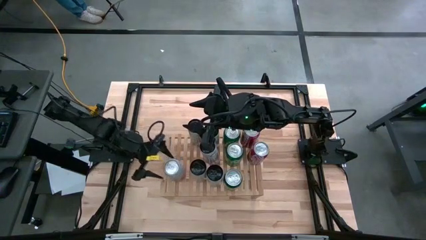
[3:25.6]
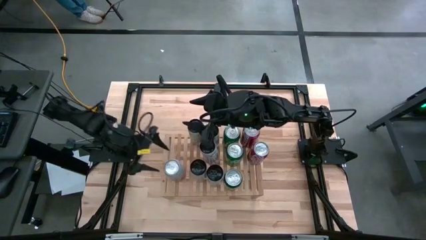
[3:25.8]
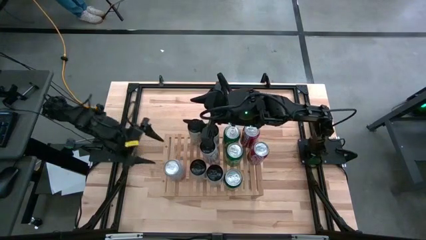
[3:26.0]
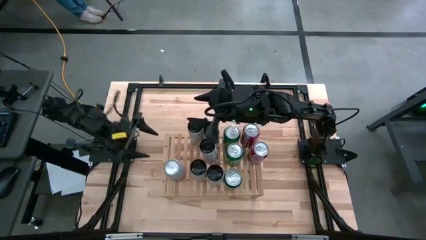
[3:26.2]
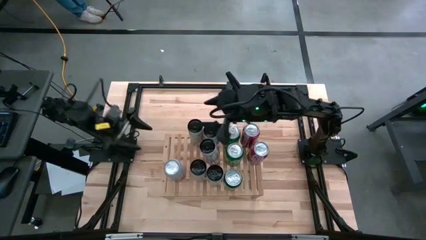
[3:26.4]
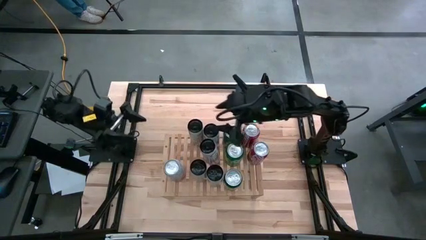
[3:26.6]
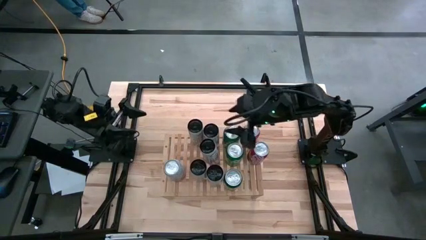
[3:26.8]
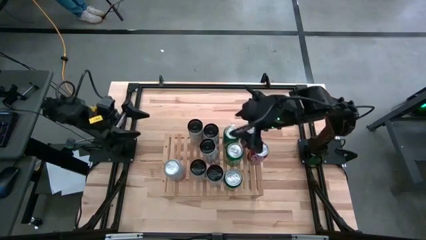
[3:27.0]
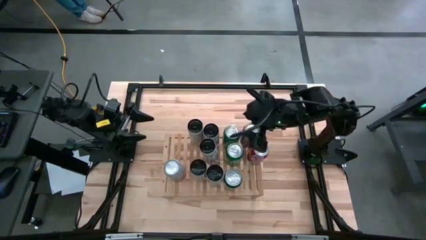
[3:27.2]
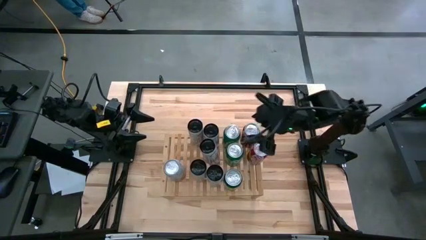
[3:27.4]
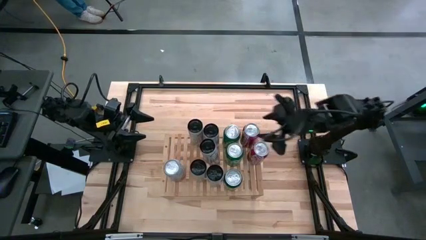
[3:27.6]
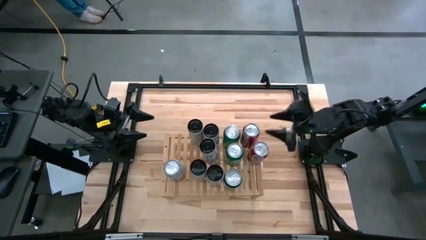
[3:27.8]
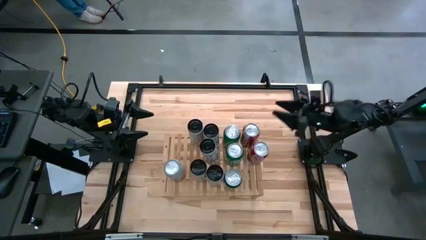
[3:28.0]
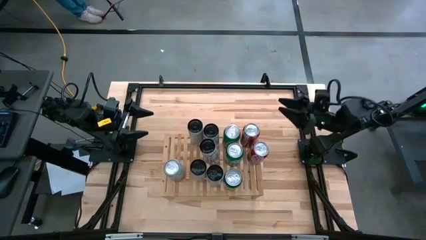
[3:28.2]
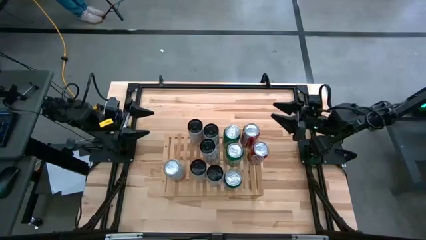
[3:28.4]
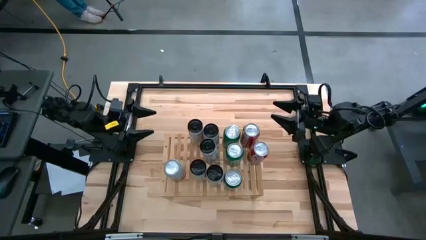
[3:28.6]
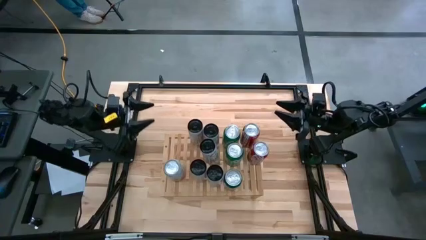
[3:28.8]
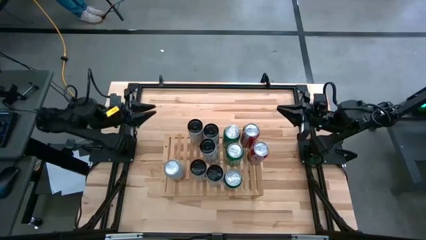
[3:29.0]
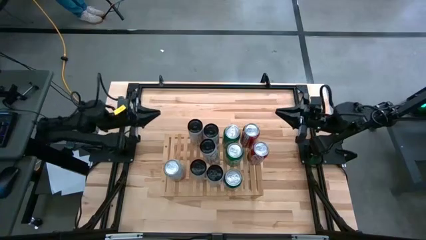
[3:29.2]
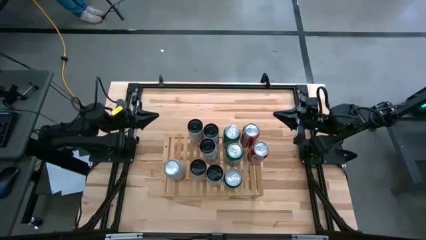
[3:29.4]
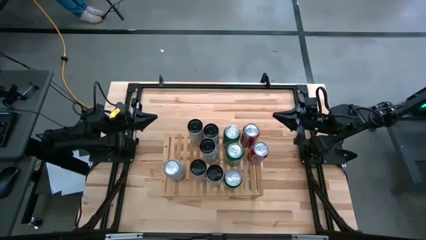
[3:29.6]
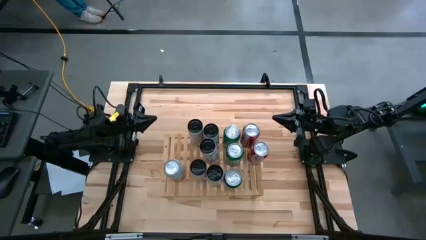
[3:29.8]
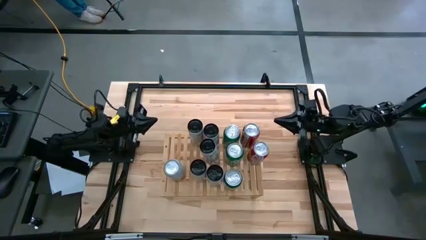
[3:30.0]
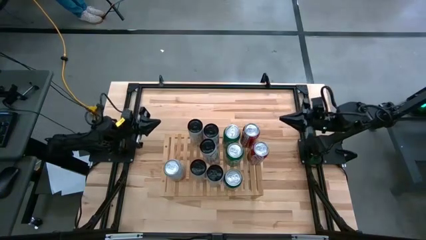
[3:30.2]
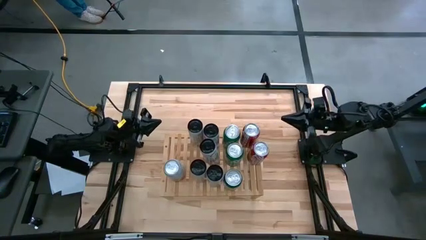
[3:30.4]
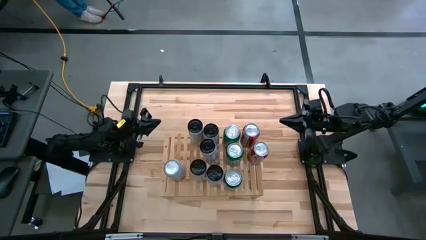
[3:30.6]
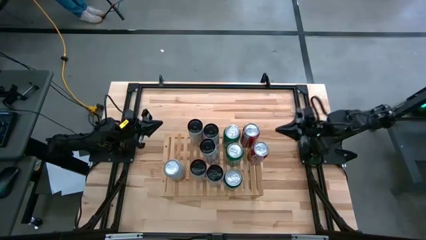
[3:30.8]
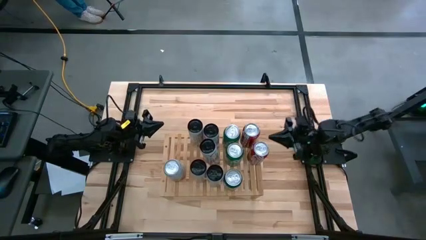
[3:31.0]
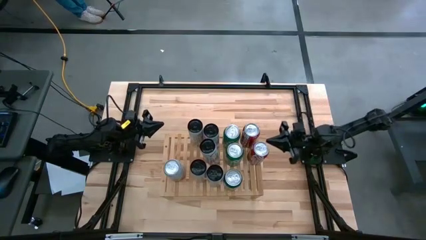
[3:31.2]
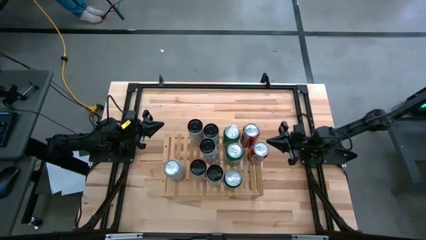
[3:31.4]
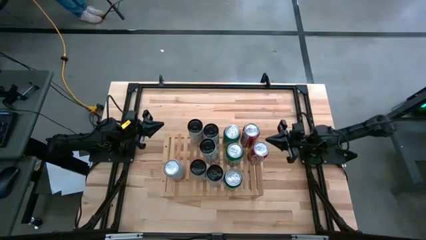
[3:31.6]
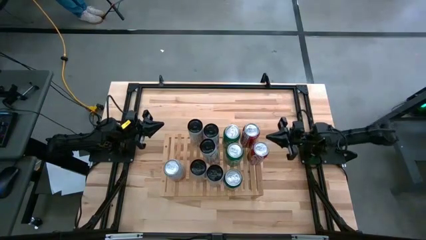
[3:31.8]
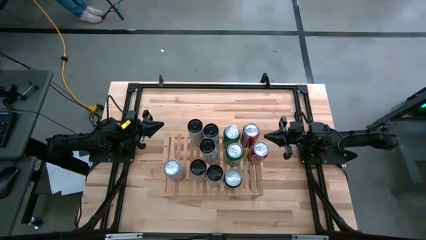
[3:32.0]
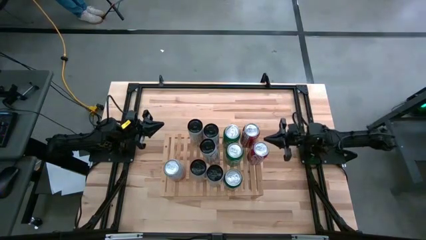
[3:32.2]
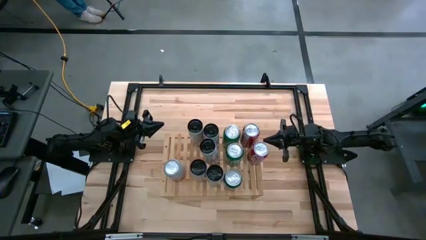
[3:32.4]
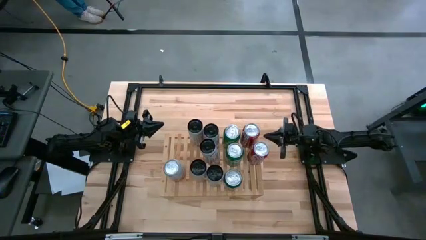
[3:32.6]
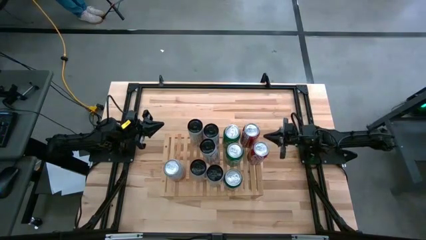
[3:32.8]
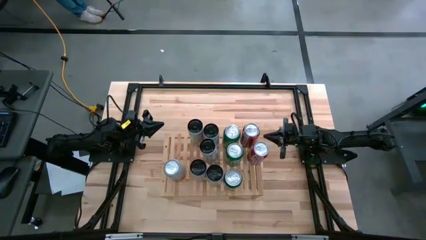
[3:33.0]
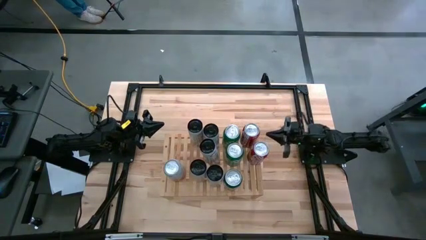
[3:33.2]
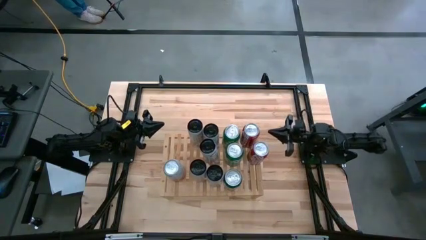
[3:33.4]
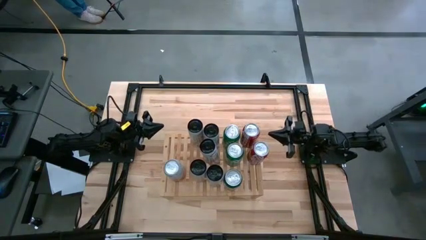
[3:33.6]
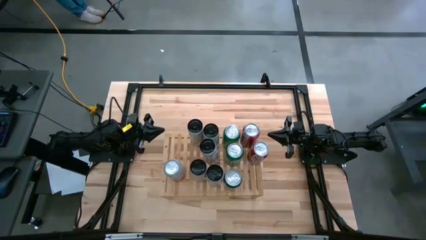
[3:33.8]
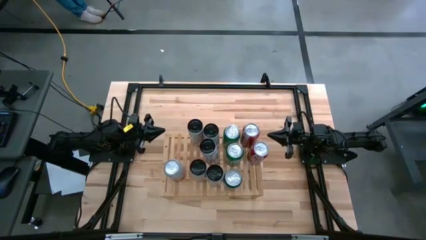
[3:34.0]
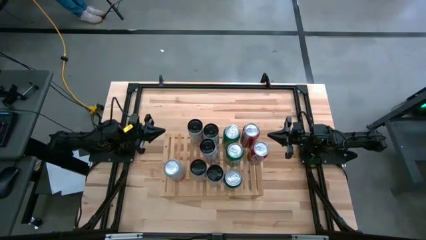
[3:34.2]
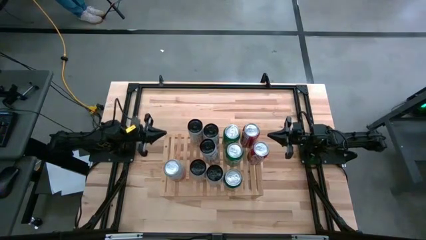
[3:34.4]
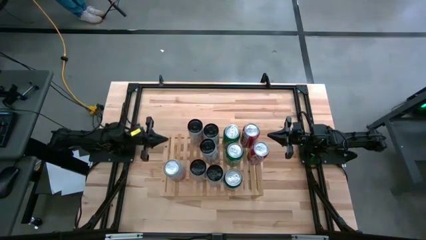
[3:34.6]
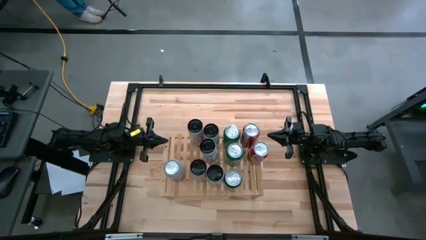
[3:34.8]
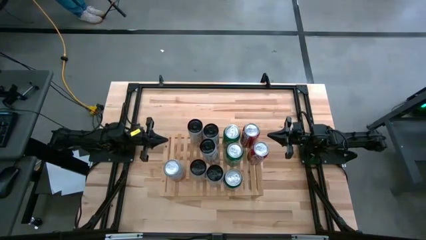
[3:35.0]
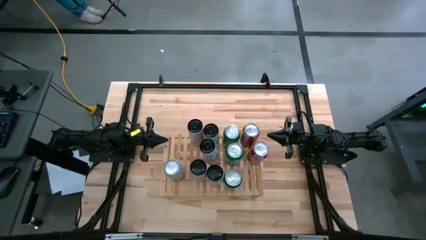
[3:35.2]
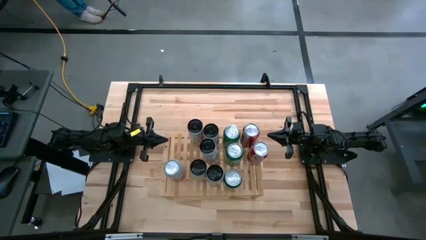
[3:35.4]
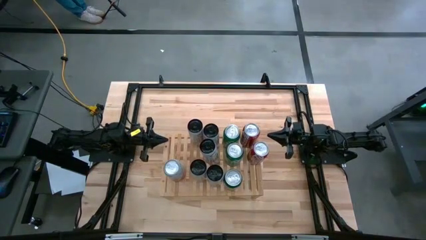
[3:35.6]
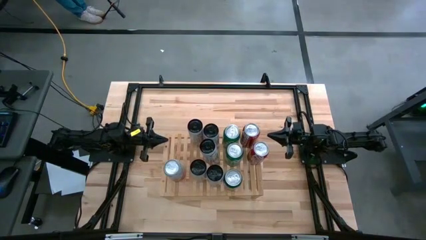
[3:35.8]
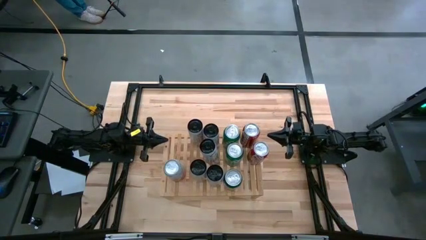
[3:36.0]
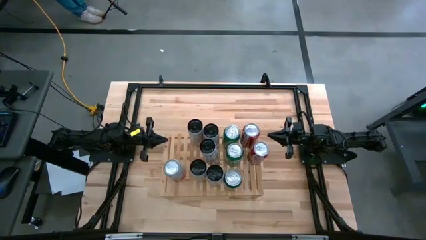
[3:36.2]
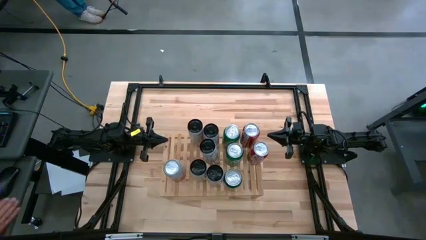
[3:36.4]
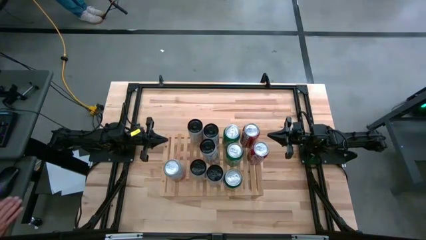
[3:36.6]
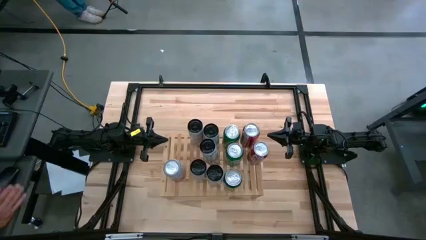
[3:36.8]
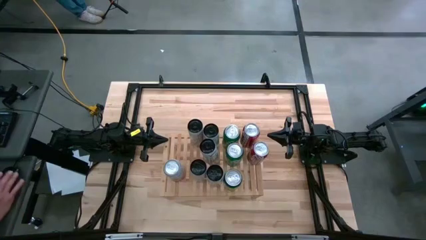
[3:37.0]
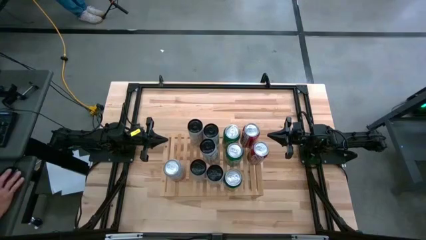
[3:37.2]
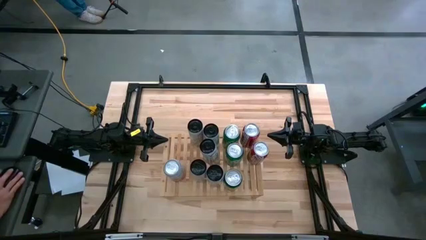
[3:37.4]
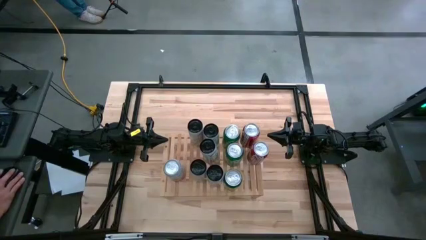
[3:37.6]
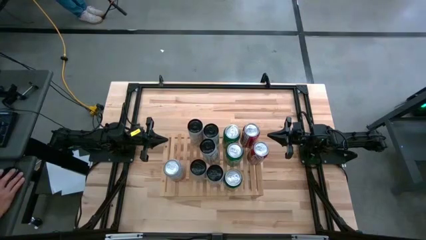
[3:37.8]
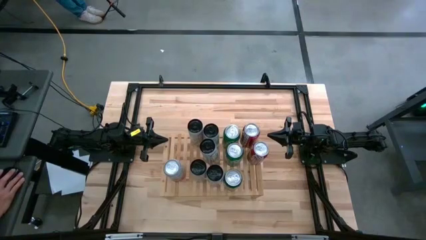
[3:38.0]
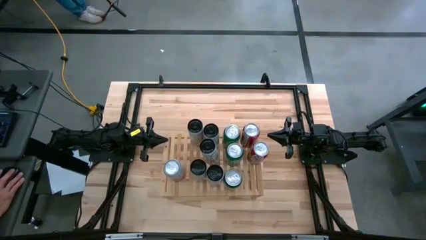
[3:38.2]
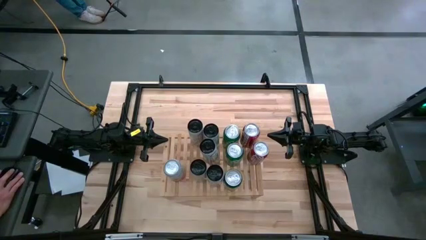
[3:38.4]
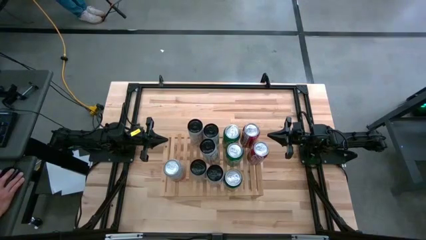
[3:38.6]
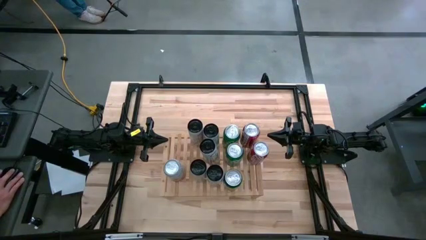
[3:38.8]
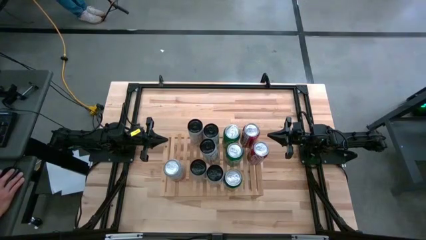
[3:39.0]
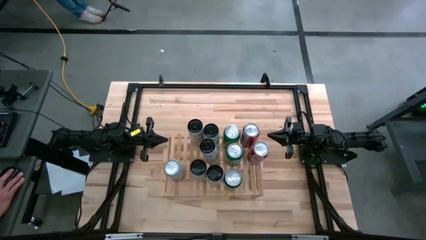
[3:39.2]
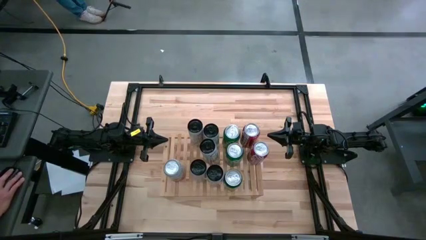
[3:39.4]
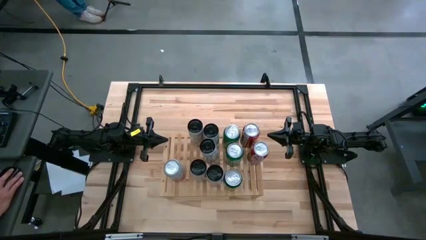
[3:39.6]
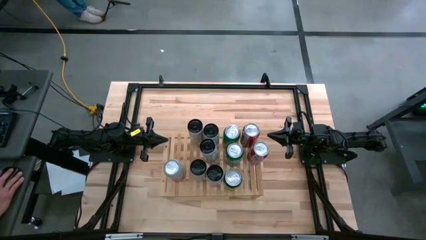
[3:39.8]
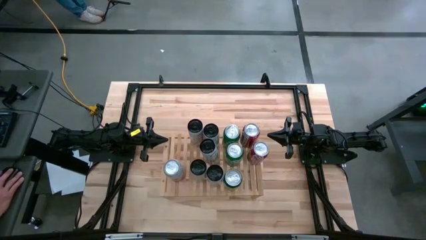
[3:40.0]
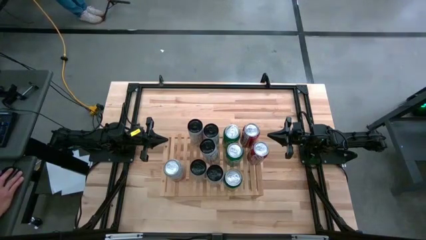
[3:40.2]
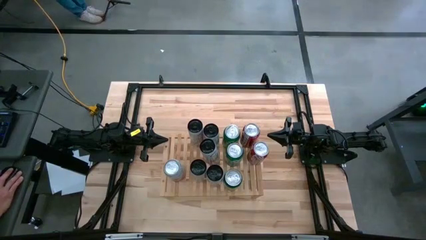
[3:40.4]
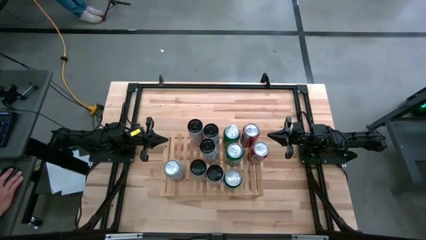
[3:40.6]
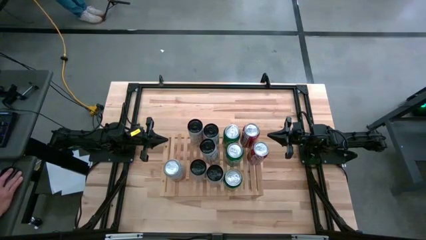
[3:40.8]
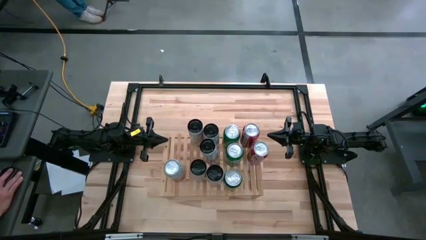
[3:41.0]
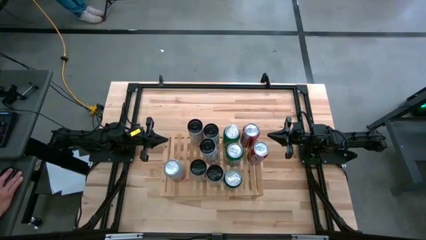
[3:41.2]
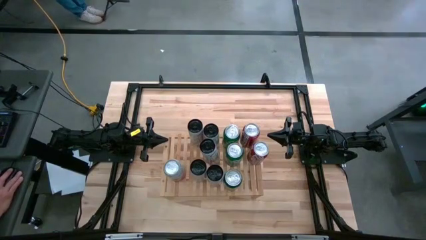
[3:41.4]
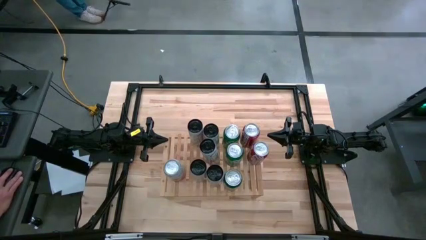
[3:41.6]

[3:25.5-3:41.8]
Task: Place canned beverage on shelf
Return to Home Position

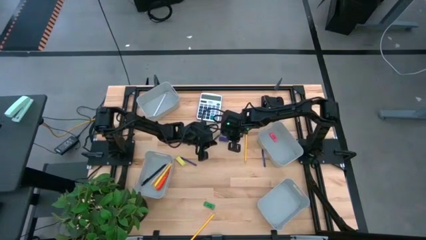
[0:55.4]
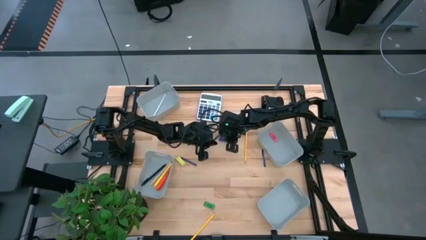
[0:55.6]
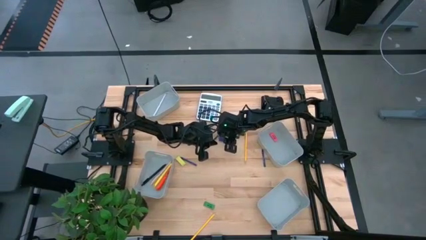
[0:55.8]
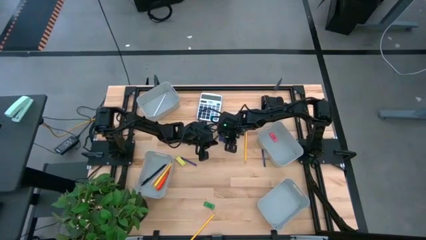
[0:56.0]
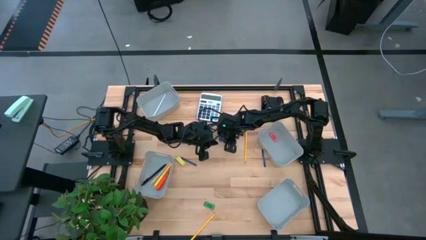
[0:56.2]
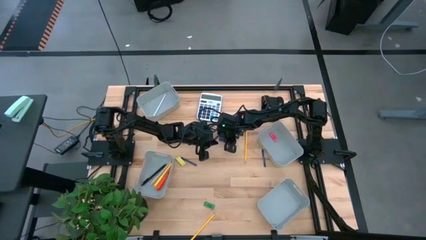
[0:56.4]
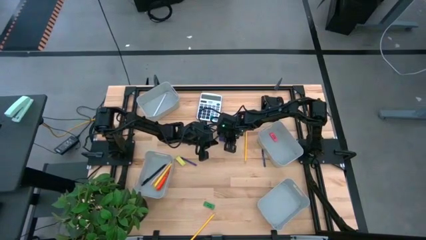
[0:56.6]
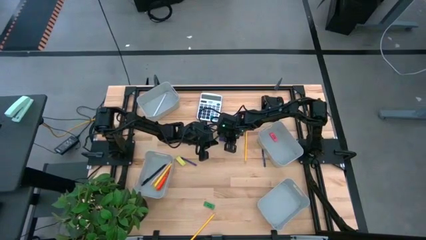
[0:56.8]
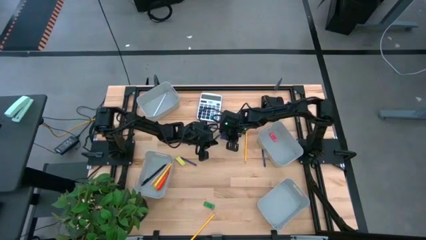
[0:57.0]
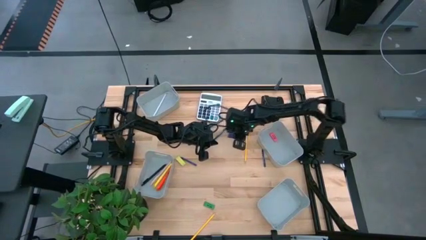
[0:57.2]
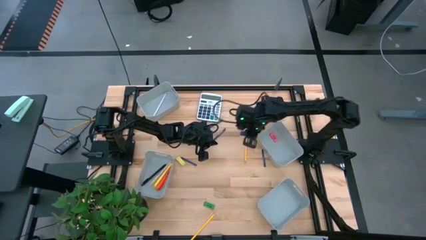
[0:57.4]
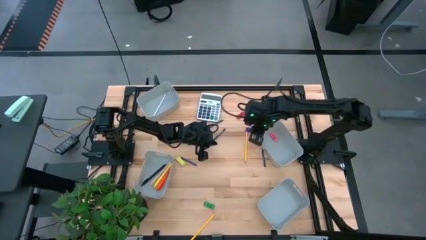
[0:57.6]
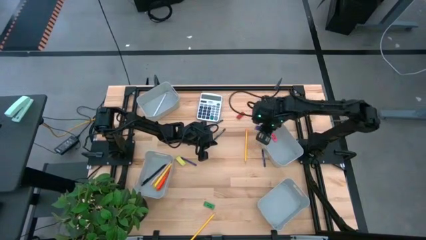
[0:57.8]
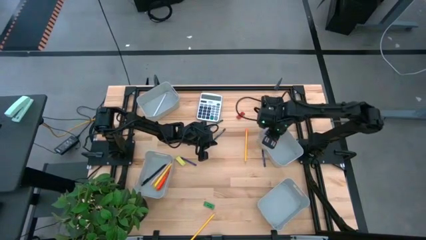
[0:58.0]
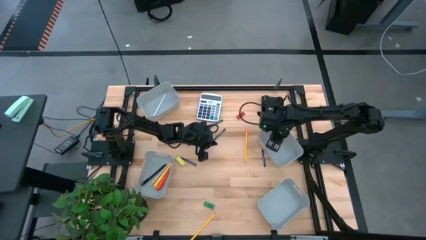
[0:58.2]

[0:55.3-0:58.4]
Task: Sort crayons/erasers/pens/pencils in bins
Put the blue eraser into the top left gray bin
